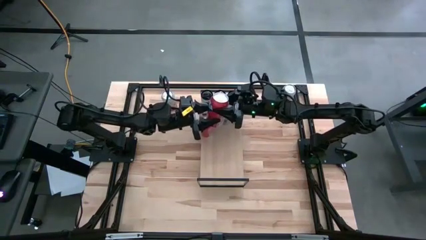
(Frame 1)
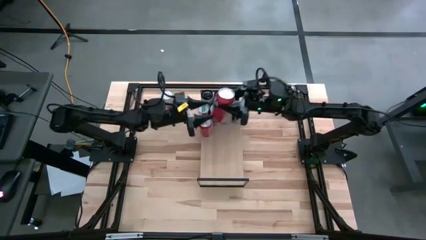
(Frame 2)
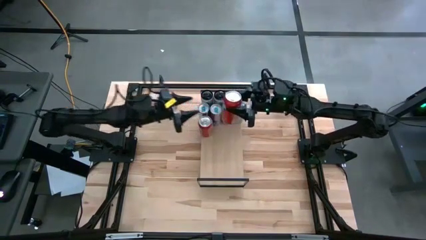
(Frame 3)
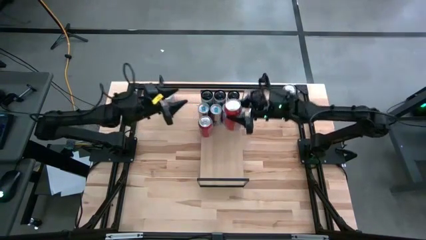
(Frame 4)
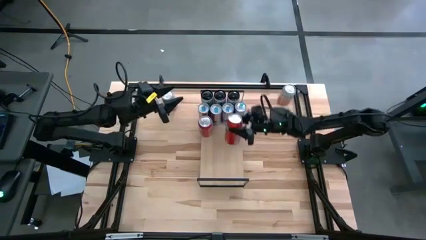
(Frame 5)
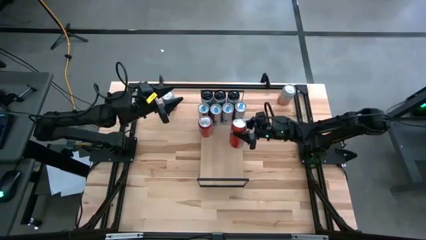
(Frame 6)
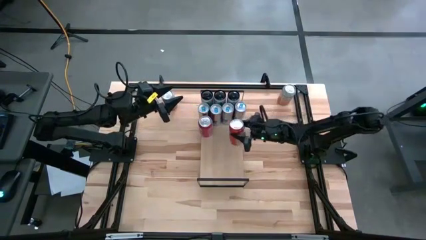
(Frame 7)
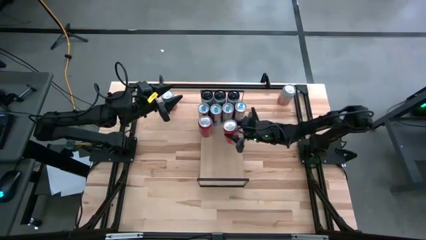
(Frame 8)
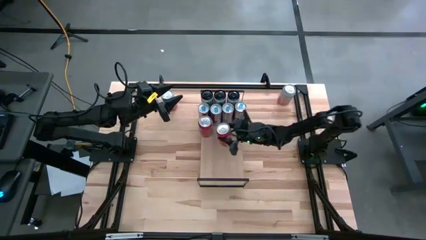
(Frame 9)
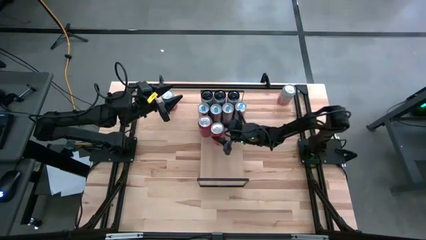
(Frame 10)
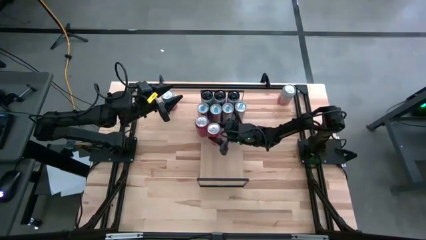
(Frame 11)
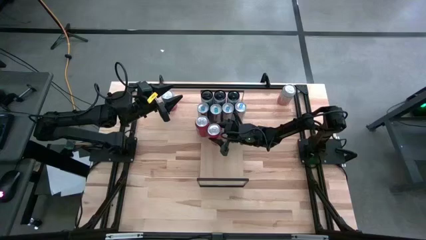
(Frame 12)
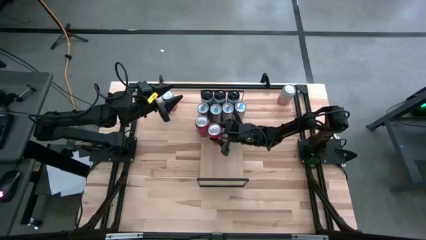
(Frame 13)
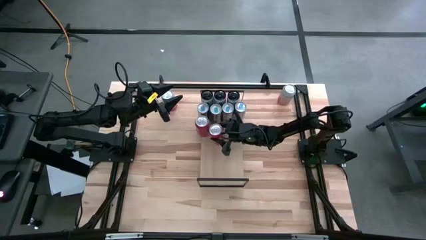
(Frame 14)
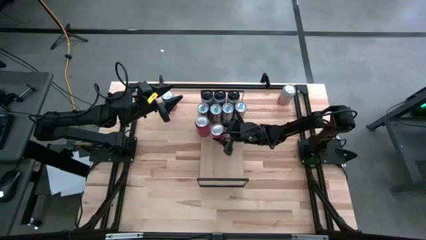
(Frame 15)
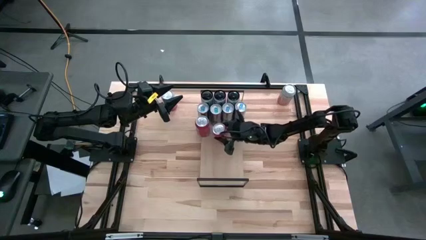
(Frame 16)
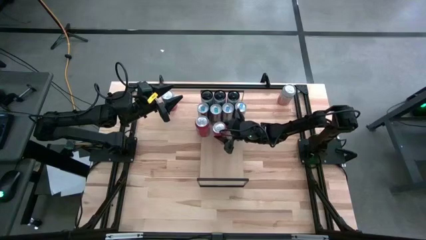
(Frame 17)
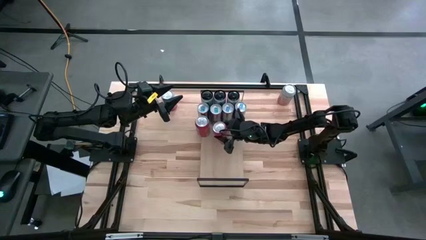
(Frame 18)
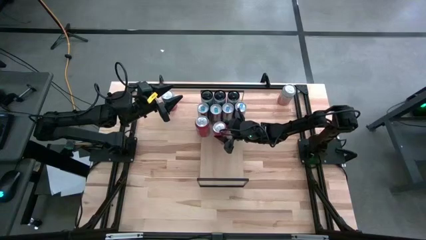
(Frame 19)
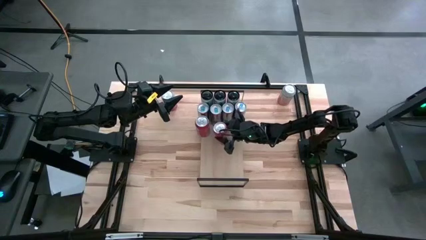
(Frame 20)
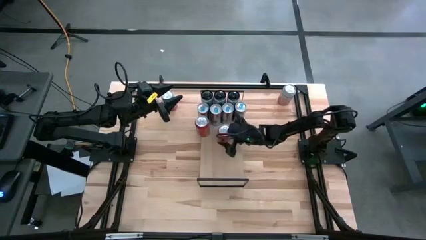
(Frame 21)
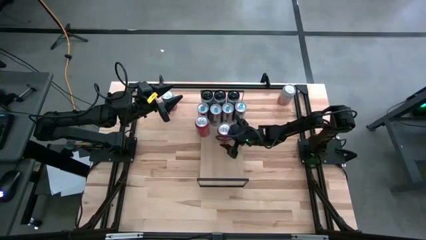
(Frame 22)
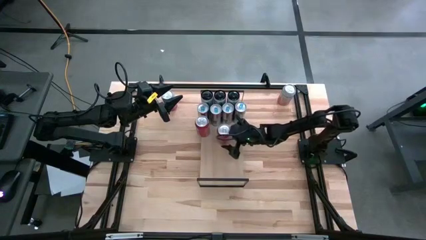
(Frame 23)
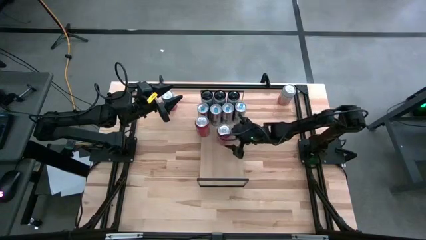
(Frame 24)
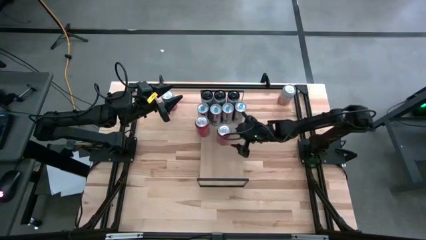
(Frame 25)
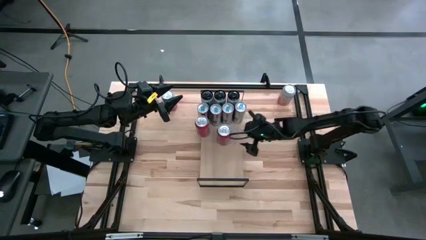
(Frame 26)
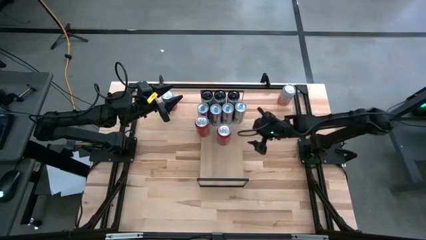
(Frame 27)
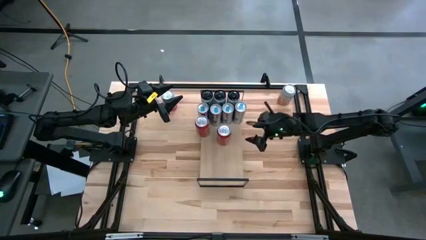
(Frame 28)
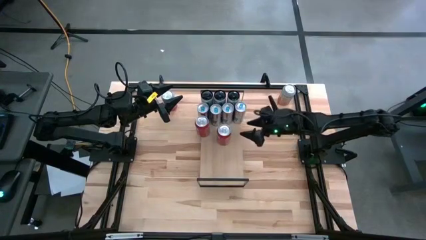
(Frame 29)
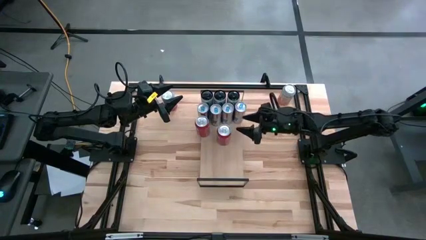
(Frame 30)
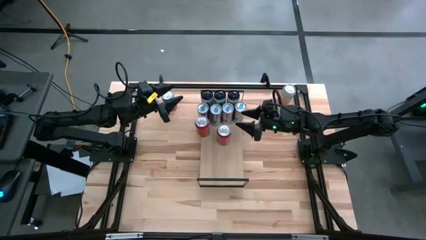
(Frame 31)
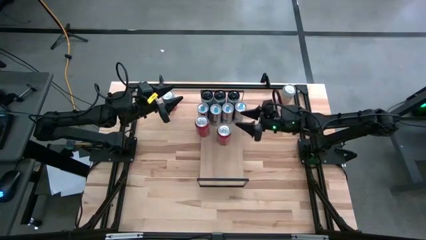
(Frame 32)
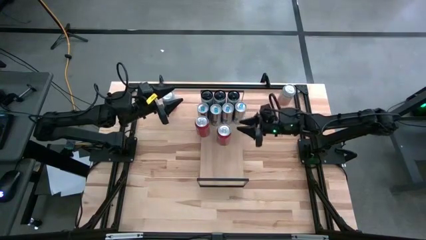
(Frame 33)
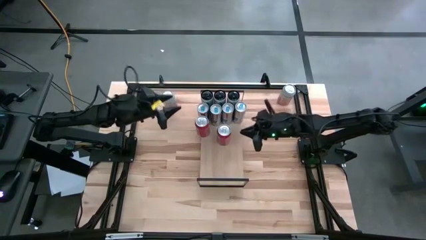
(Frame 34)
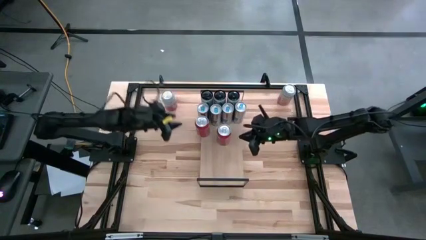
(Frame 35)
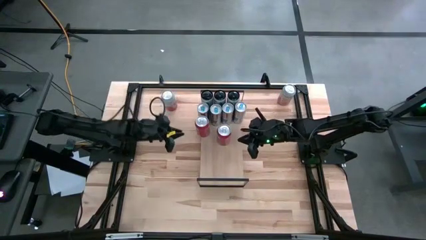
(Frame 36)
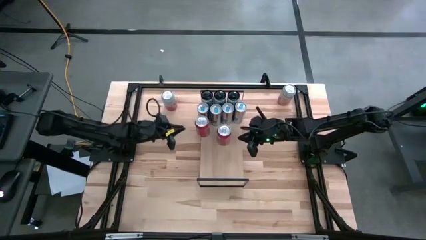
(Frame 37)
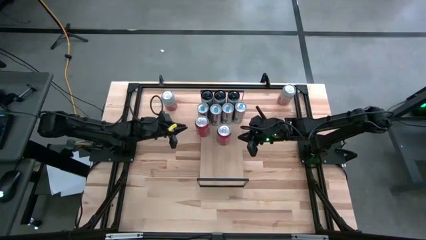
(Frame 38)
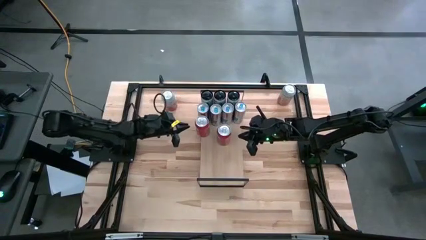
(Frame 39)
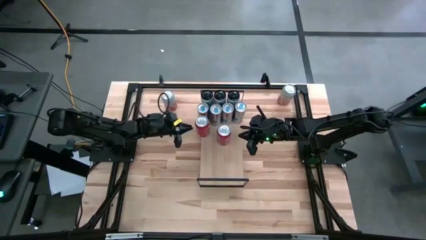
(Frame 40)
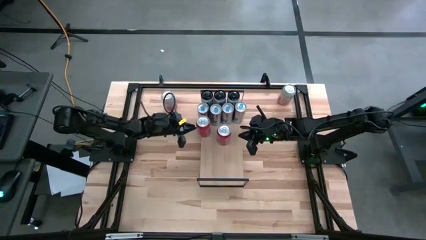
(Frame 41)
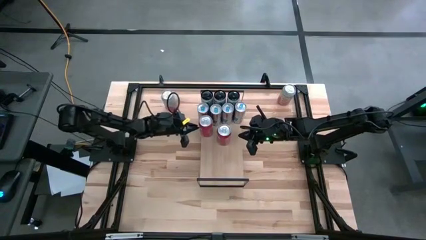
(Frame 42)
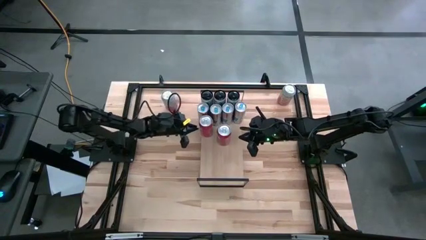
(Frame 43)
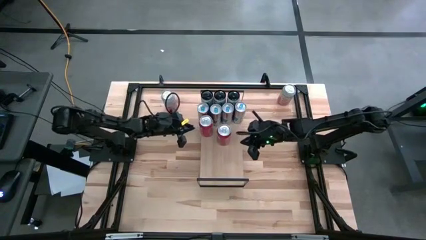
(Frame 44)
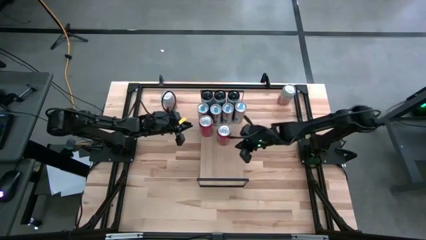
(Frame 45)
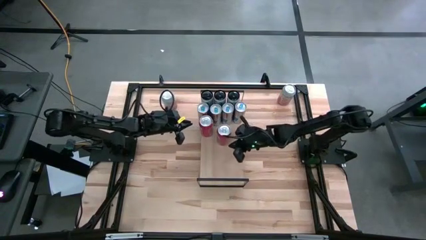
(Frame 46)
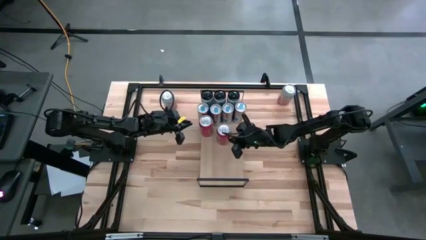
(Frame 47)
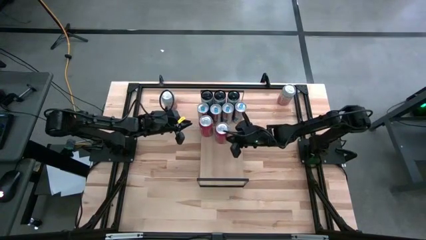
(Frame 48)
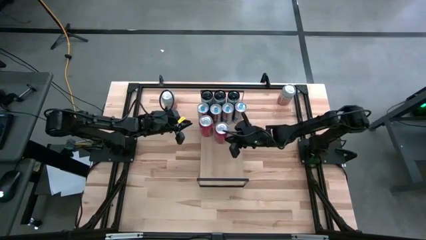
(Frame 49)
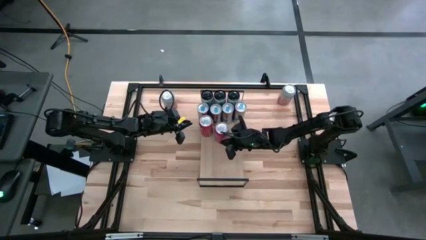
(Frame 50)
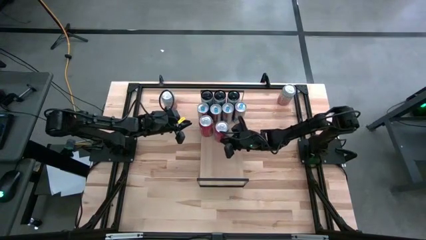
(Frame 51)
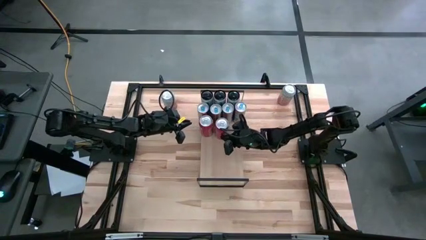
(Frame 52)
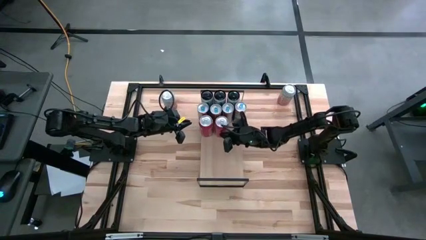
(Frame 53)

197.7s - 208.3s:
Task: Place canned beverage on shelf
Put the red soda can on the shelf aligned with the other red soda can

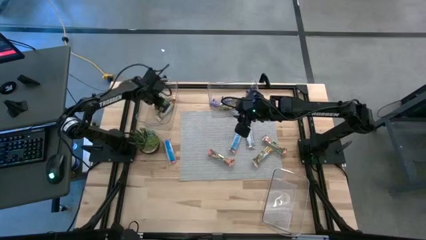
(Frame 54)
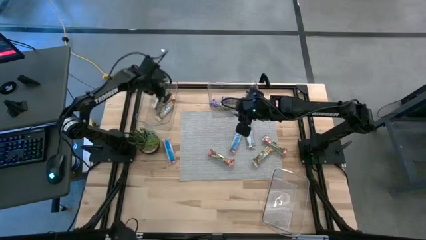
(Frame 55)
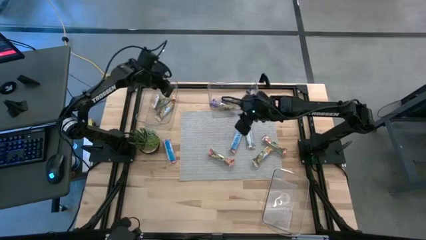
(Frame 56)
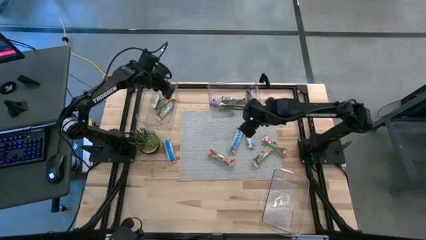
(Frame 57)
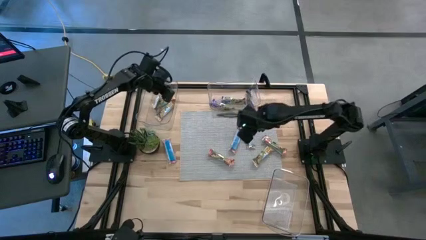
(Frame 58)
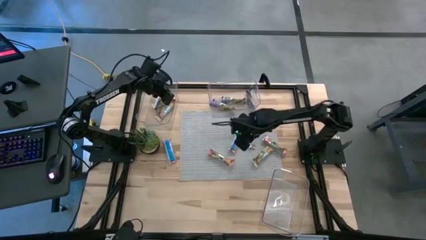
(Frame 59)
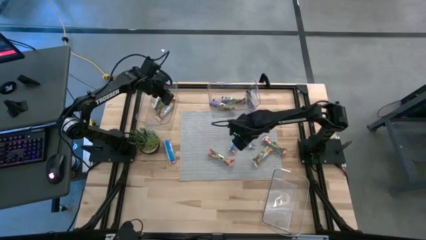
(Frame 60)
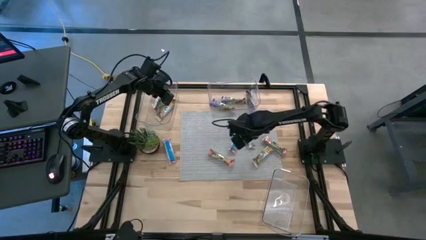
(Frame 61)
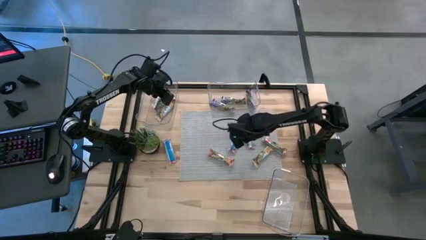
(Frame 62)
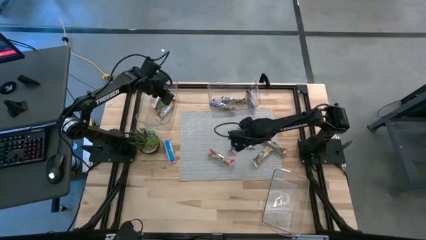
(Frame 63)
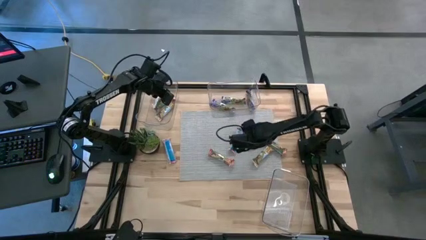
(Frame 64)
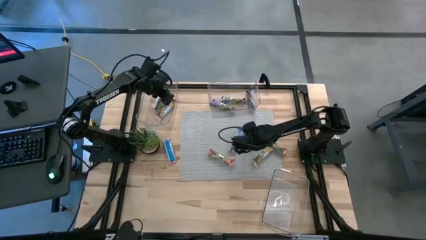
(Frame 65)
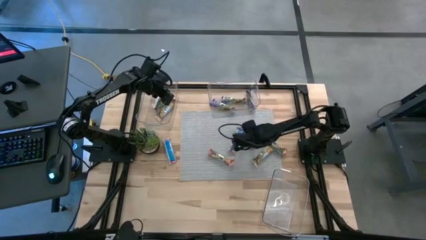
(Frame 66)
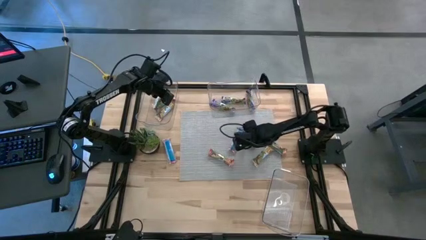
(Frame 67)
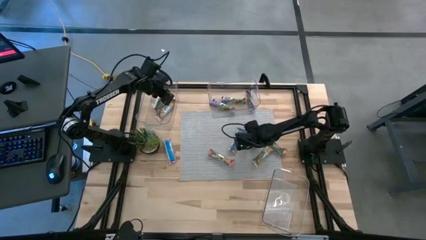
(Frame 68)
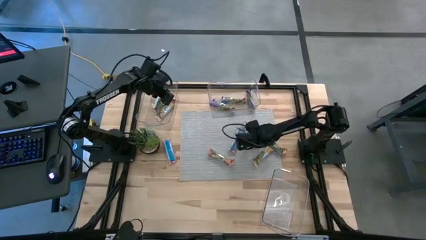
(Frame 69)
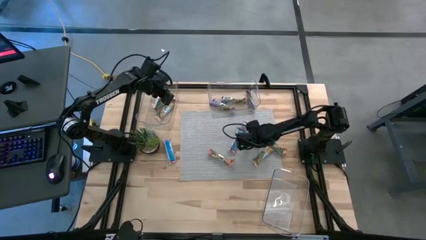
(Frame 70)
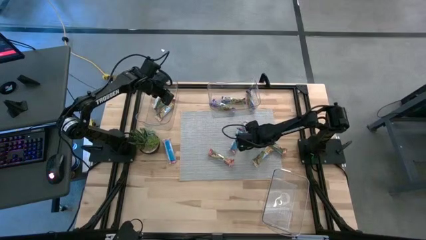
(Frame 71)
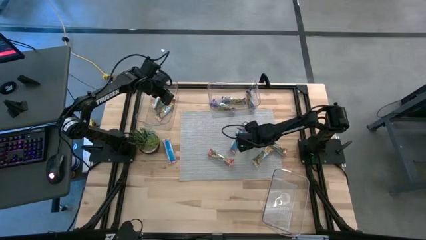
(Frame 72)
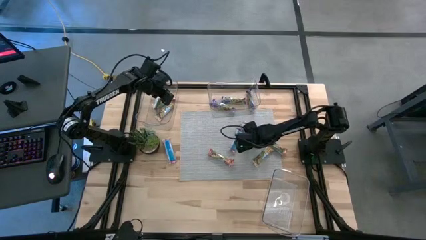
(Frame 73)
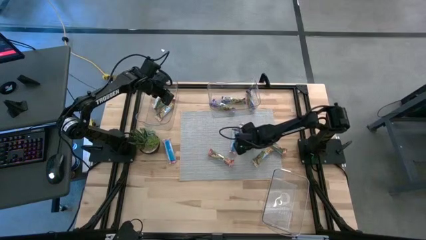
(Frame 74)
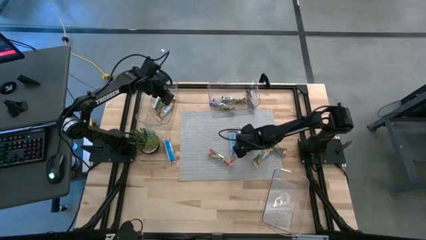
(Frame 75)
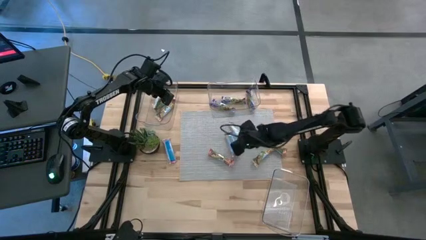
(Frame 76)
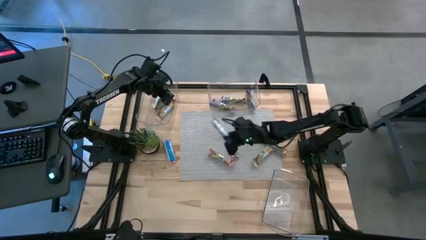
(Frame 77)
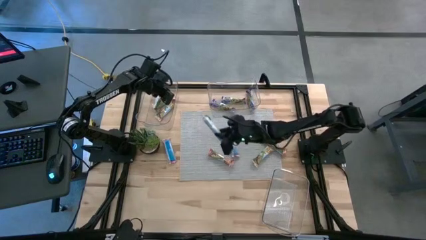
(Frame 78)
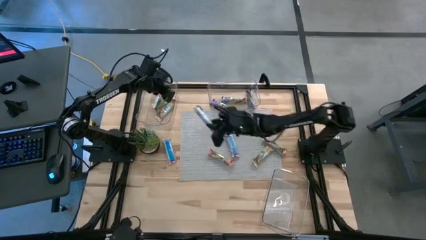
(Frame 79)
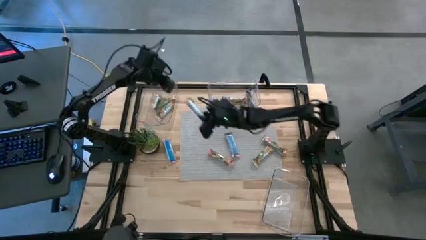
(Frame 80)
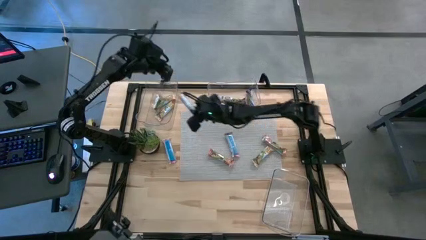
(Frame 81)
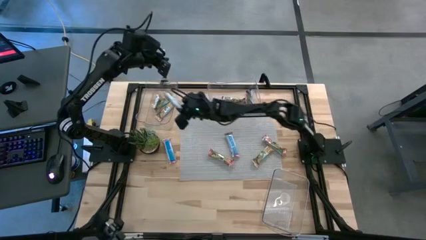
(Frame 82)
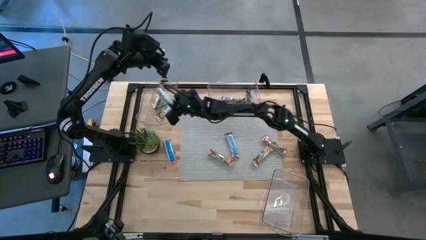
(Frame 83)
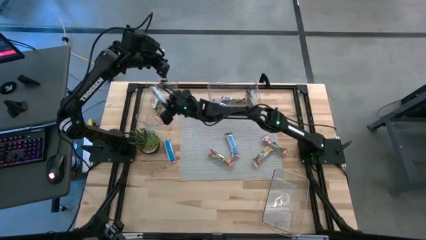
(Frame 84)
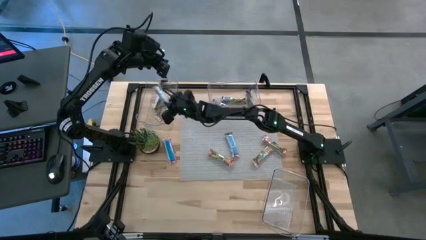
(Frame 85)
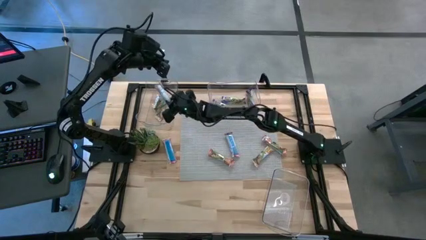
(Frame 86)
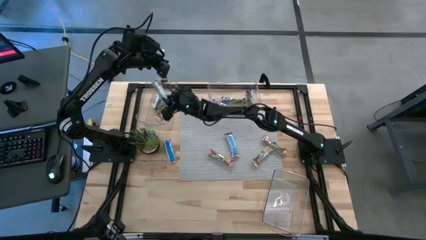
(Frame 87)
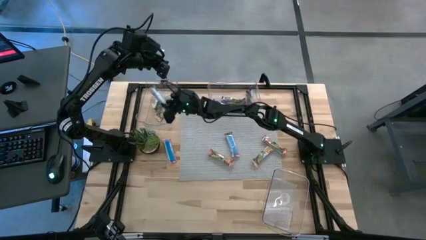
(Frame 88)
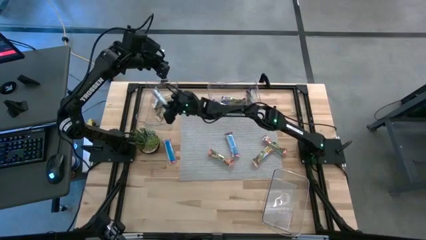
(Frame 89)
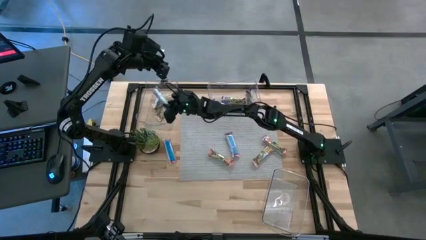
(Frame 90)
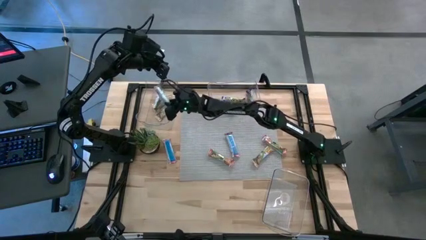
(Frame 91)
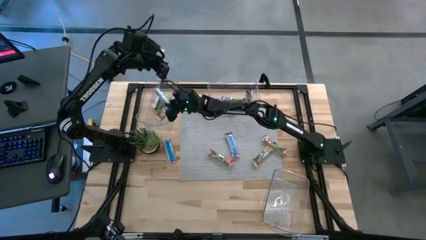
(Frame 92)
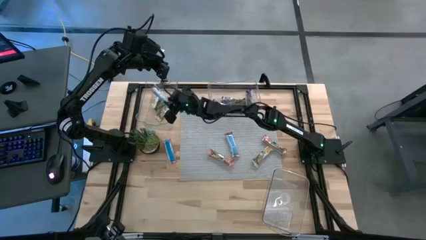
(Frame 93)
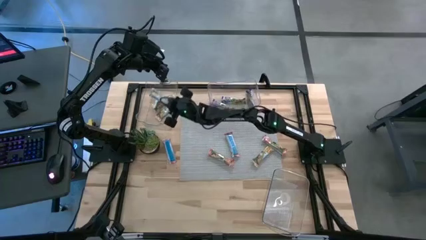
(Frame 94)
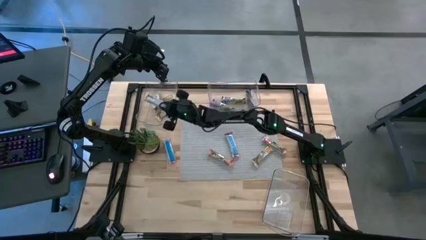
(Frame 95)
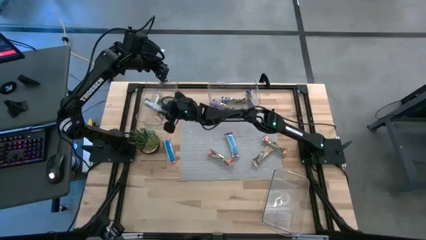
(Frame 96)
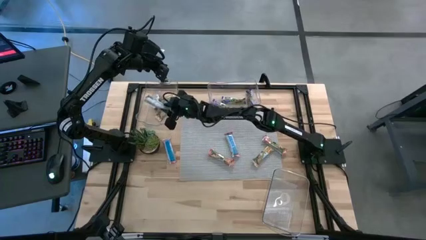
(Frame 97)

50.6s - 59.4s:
Task: Pick and place Granola Bars by type
Put the yellow granola bar into the left transparent bin
